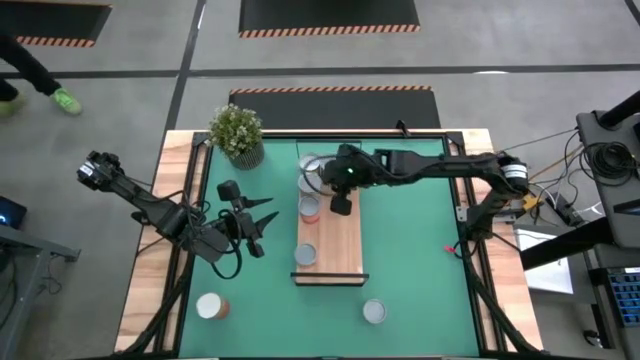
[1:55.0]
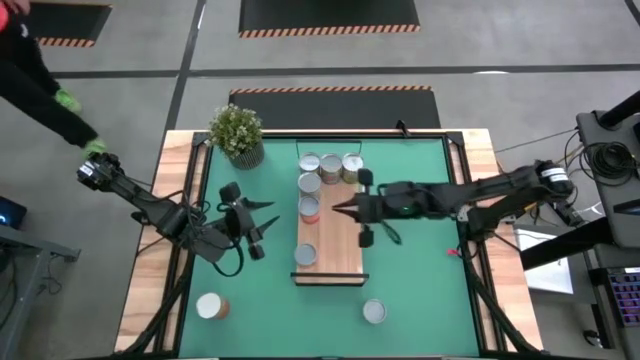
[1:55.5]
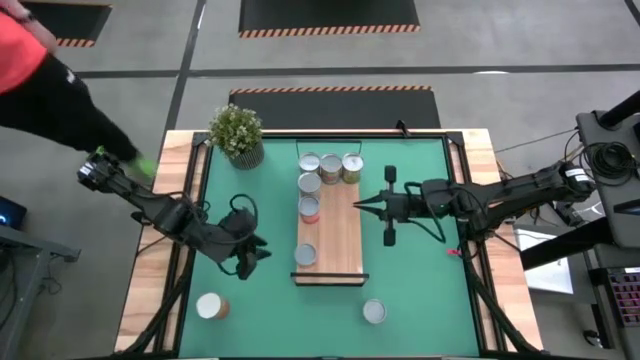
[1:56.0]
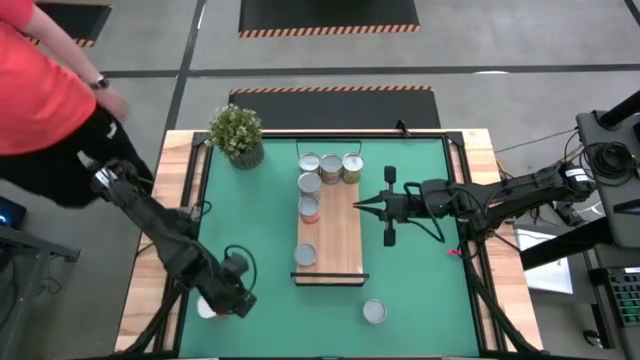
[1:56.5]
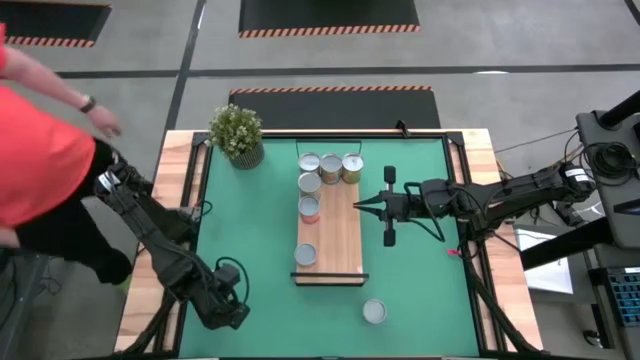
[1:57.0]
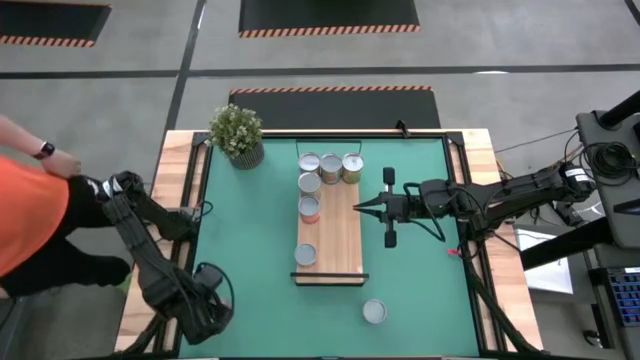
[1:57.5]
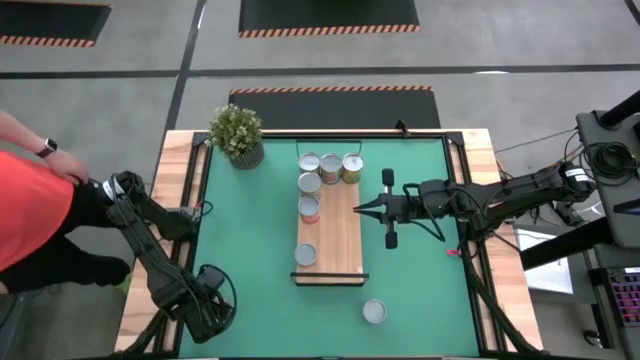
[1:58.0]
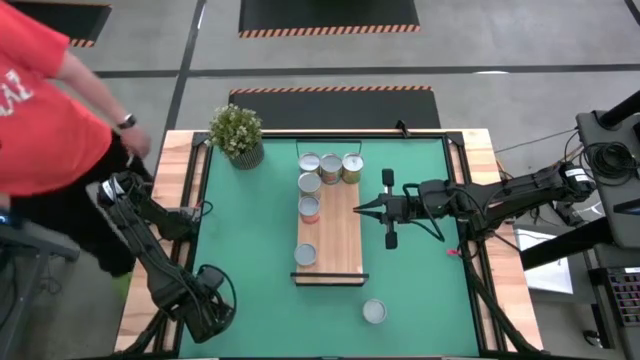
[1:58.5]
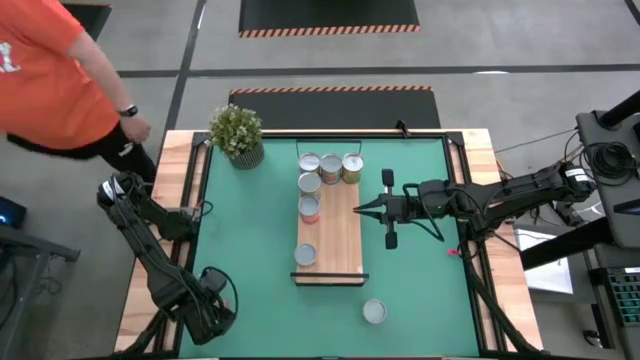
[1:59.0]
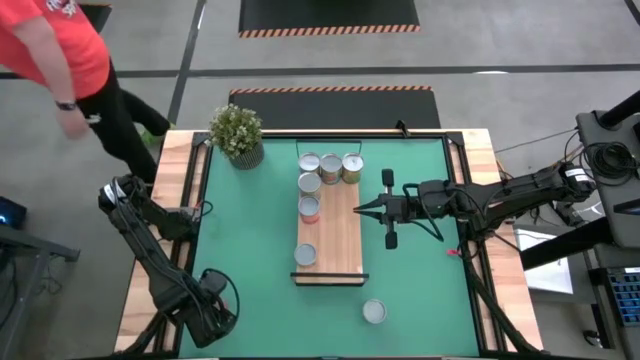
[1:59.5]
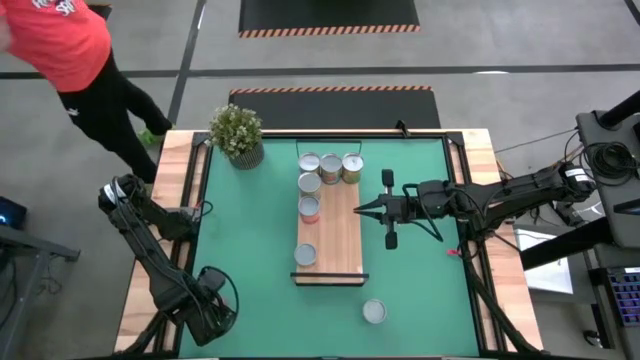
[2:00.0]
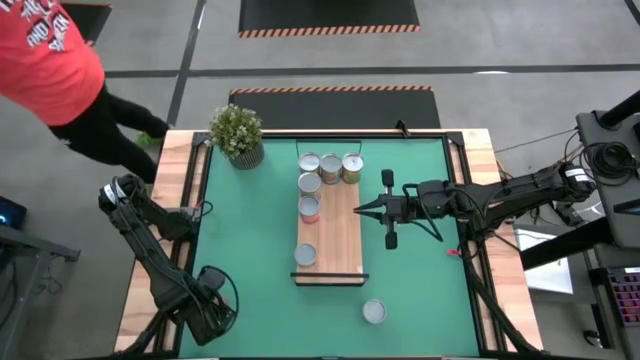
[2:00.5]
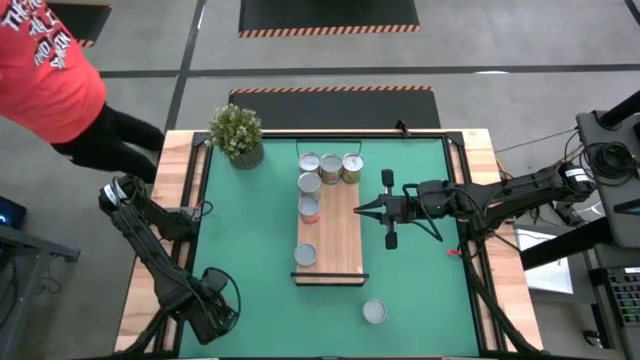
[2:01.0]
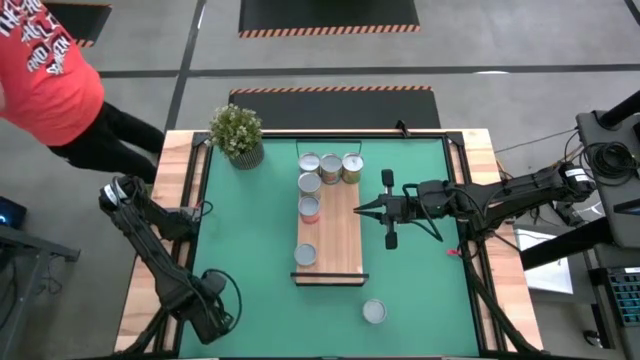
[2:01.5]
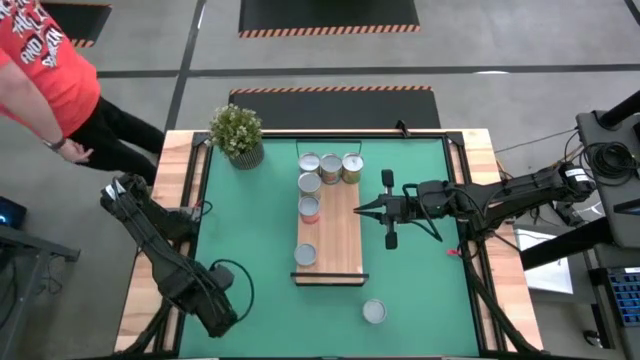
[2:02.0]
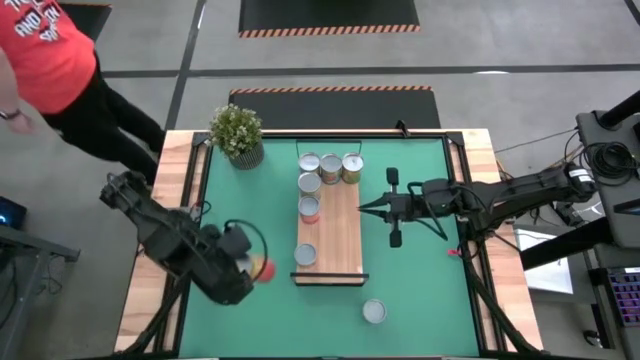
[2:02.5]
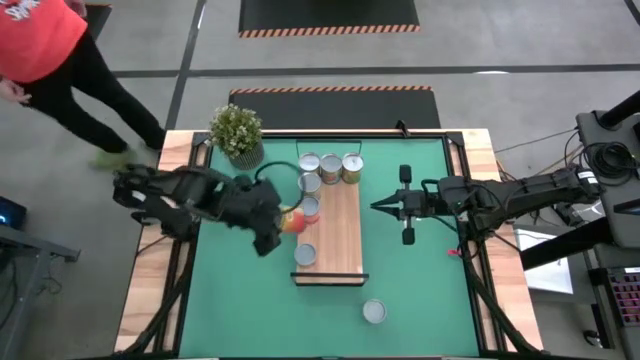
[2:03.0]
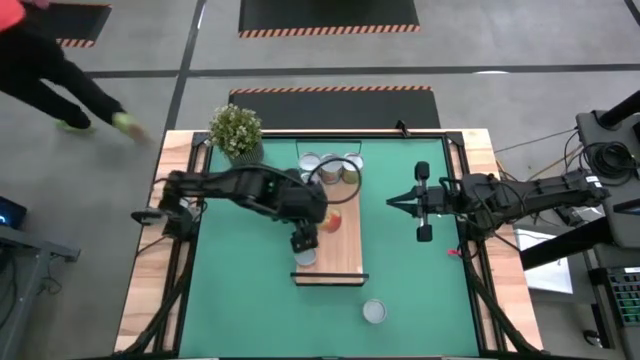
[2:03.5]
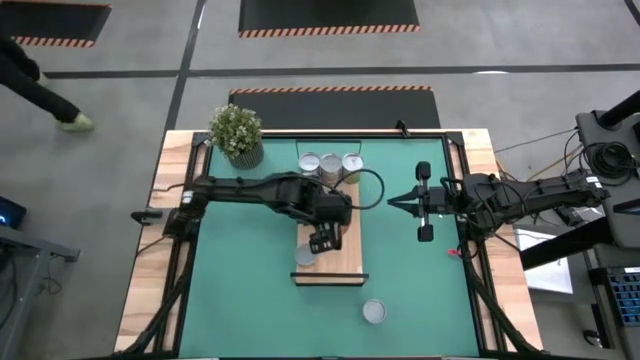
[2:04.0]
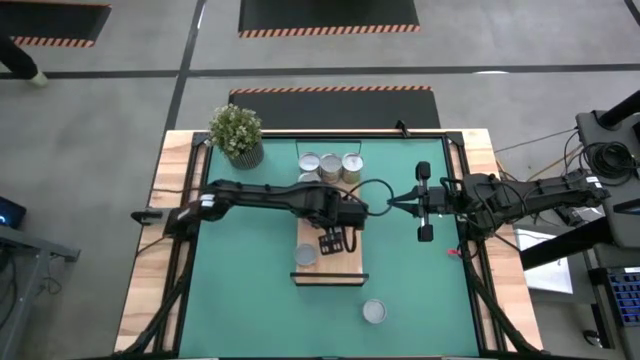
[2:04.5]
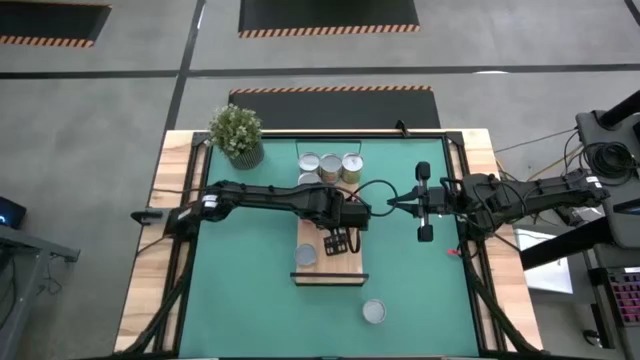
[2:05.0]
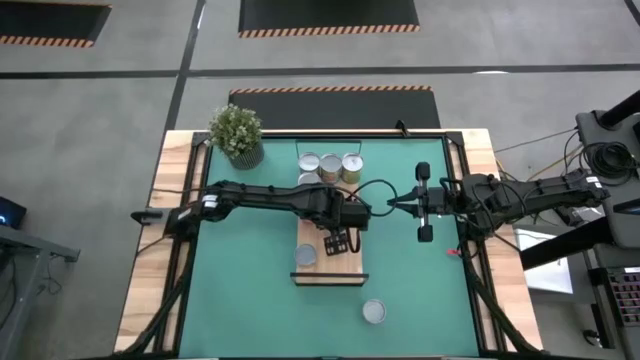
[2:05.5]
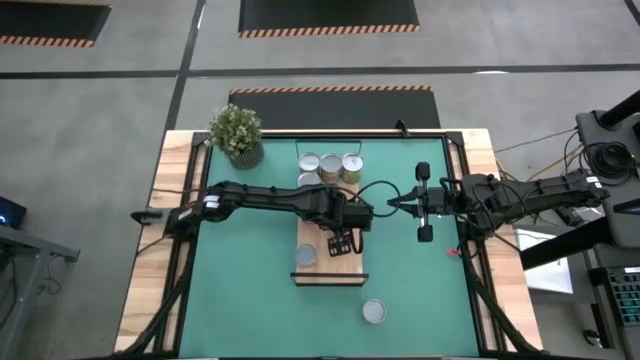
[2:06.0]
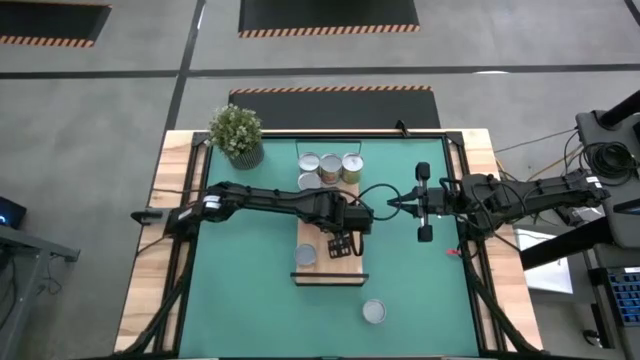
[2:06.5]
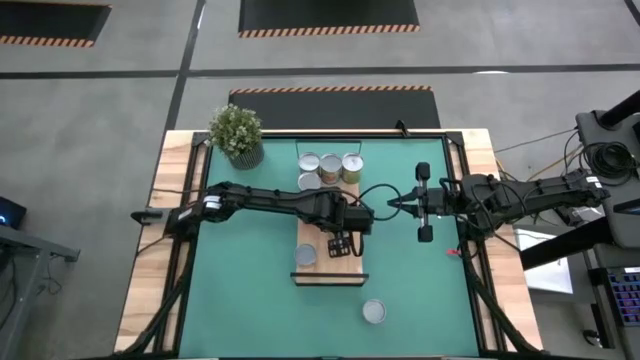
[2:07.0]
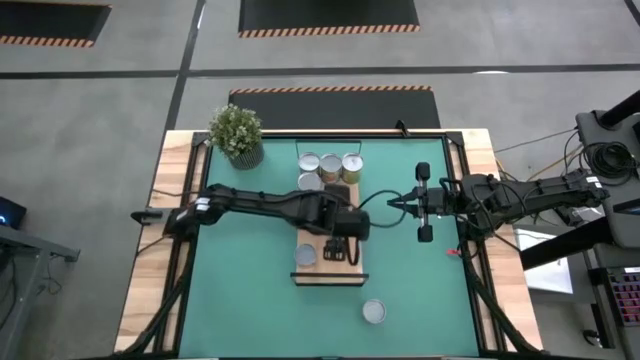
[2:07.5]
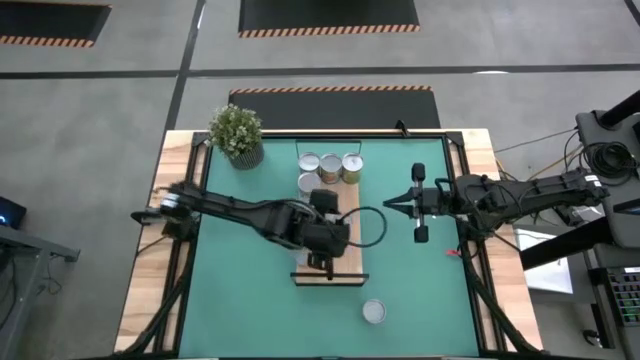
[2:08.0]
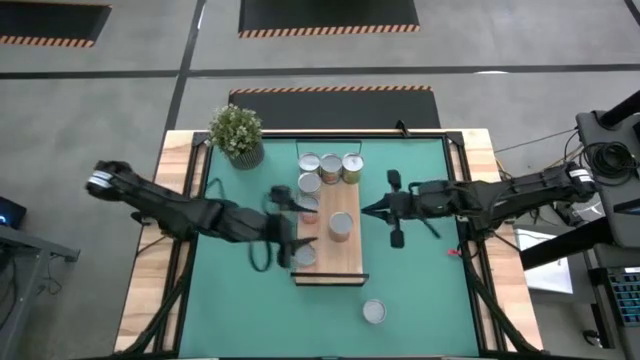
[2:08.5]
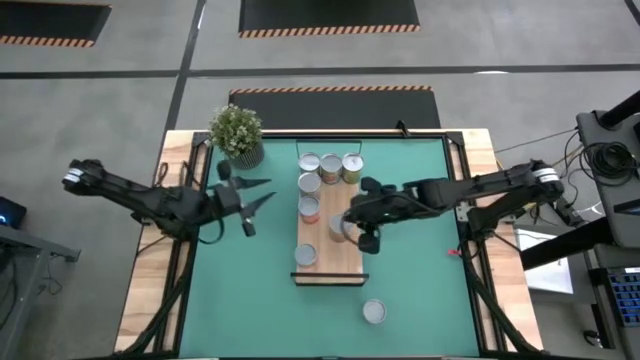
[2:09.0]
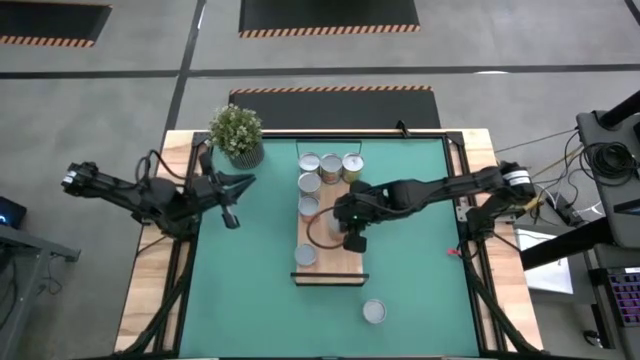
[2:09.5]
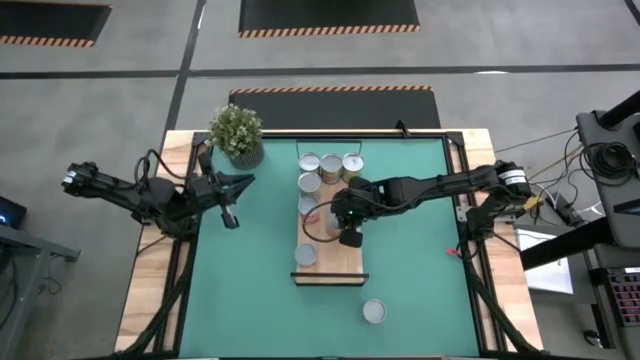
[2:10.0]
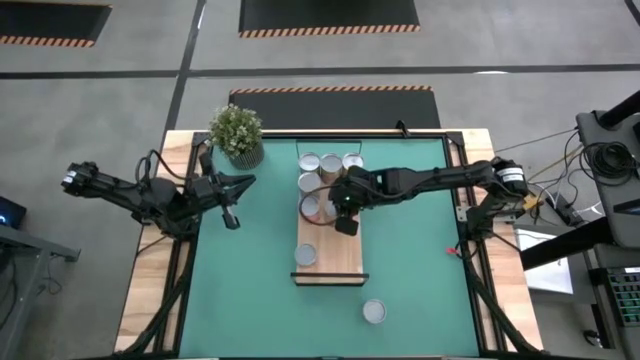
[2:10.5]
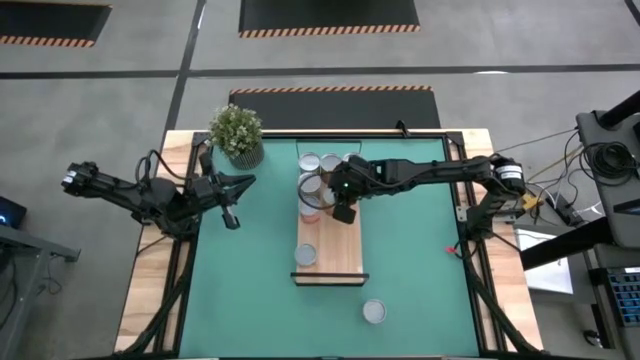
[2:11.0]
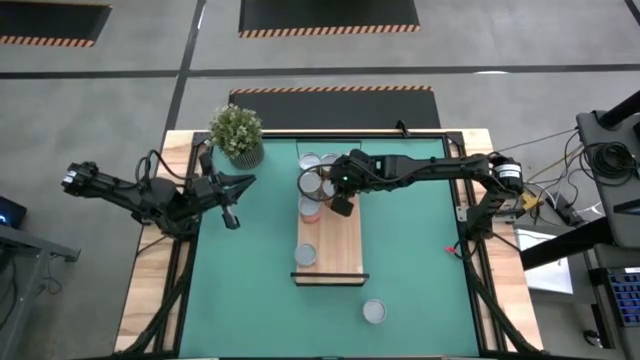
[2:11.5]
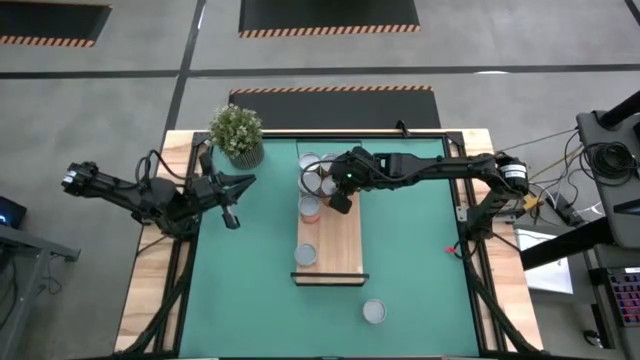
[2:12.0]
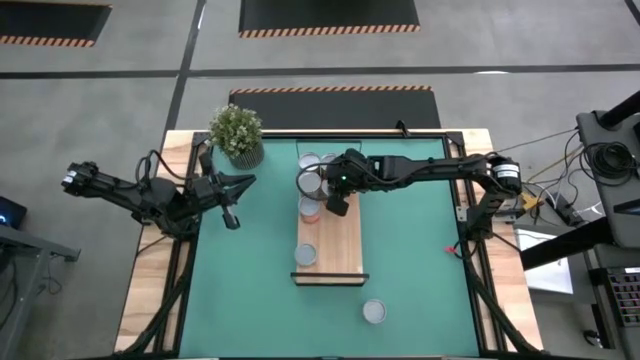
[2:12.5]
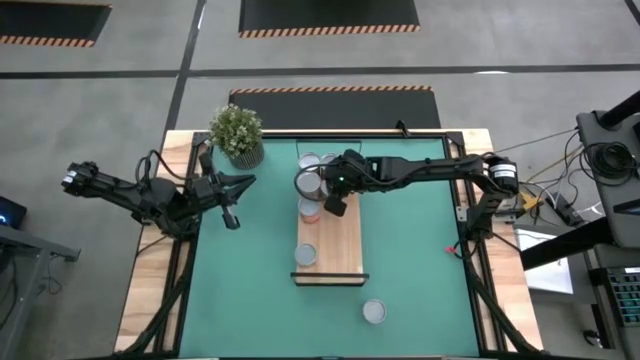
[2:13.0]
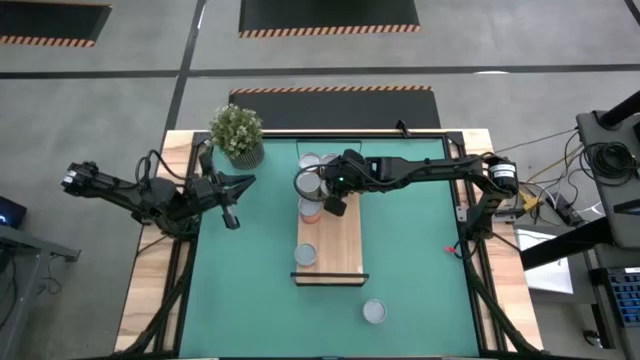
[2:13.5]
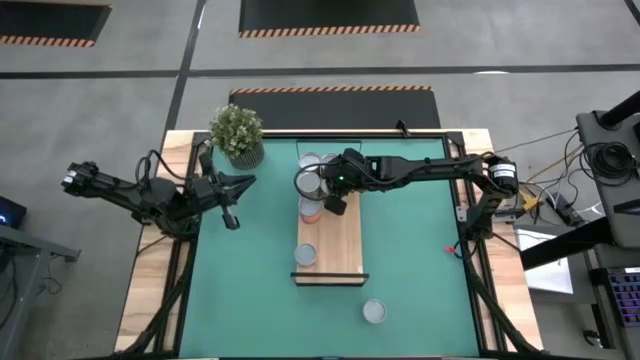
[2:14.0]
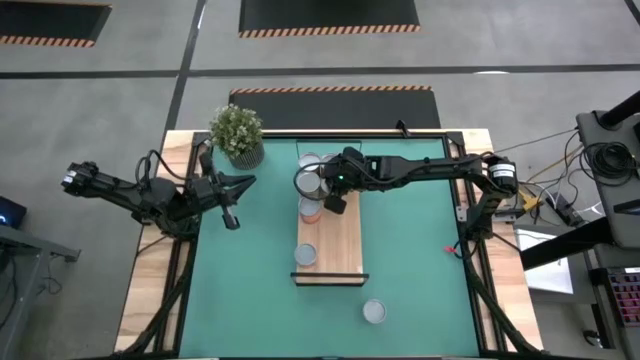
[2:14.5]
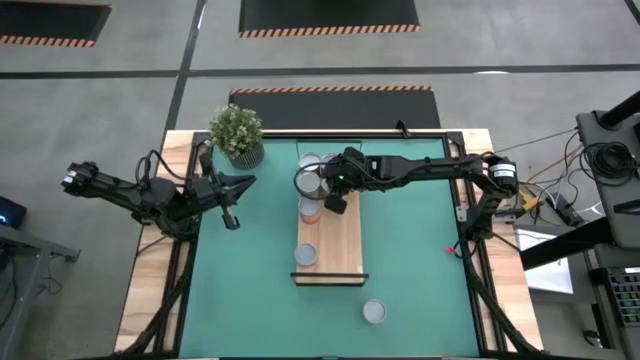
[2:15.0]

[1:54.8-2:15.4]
Task: Pick and place cans onto a shelf
Put the canned pineapples on the shelf

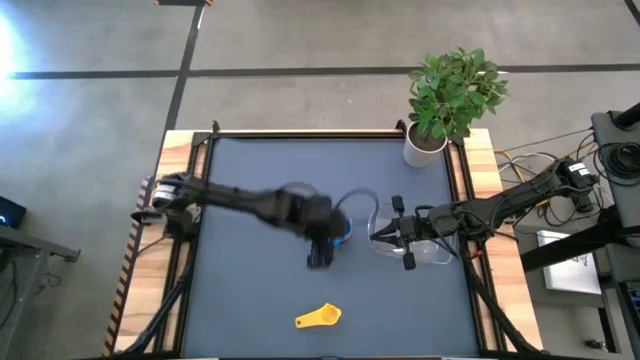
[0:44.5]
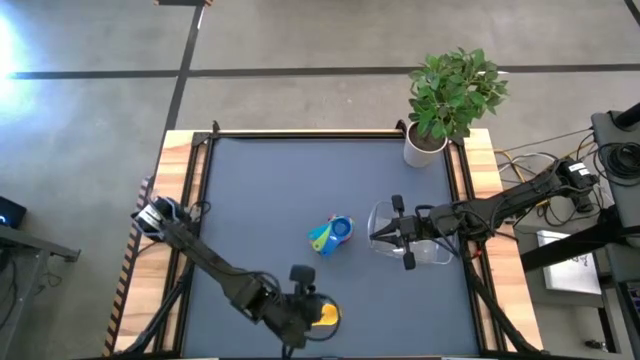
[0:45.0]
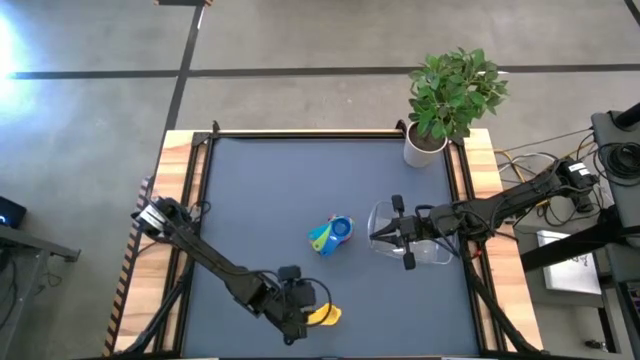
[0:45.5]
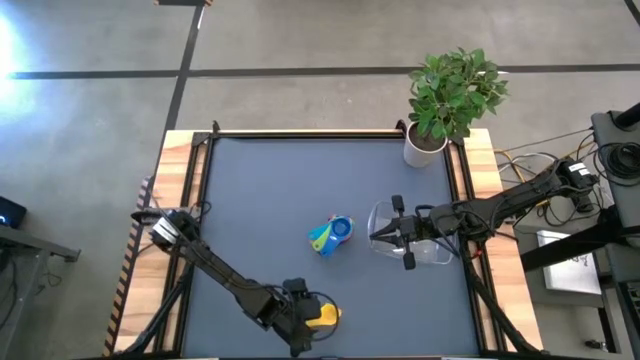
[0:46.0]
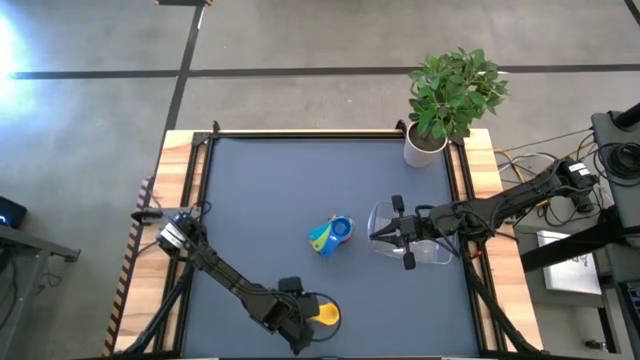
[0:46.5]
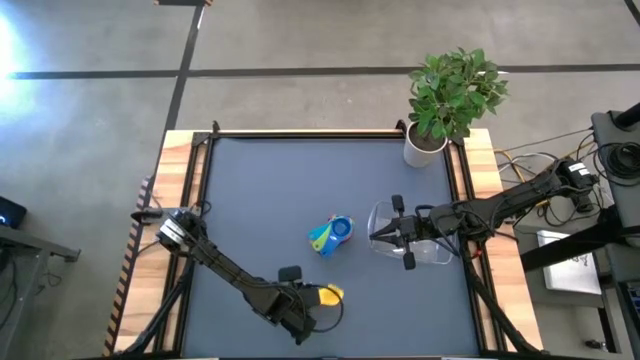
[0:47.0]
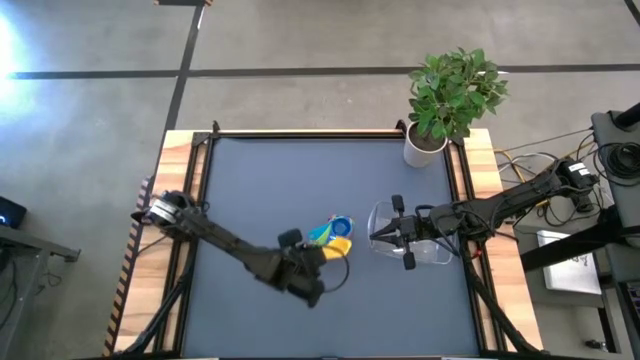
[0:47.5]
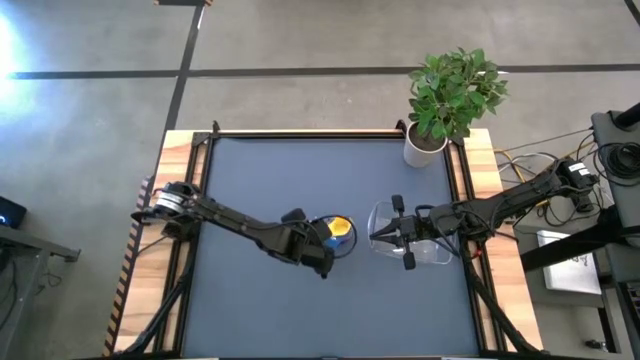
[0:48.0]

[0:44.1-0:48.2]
Task: Nest measuring cups in basket
Stack the yellow measuring cup on the blue measuring cup
